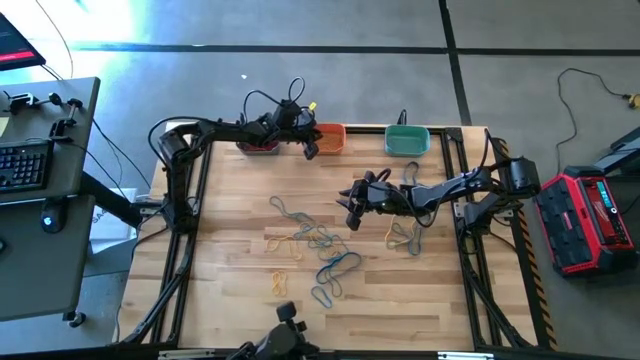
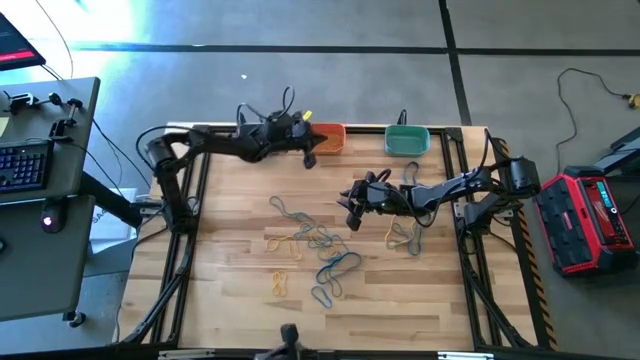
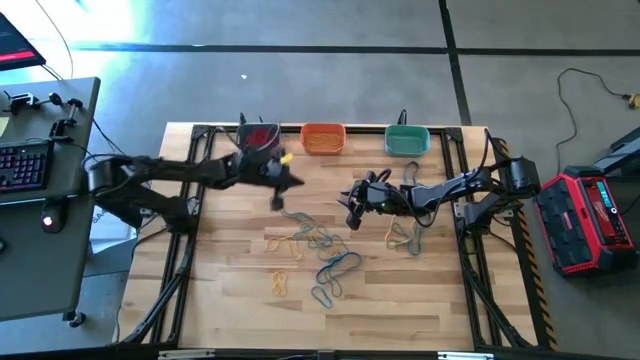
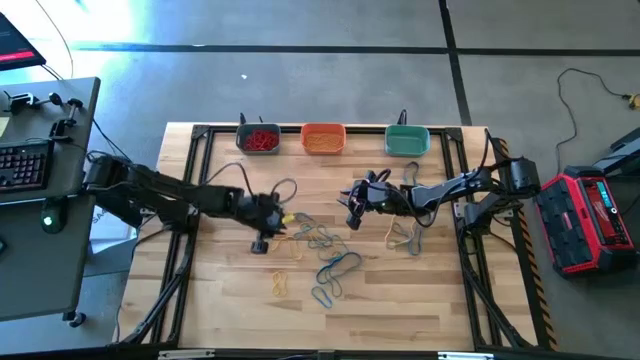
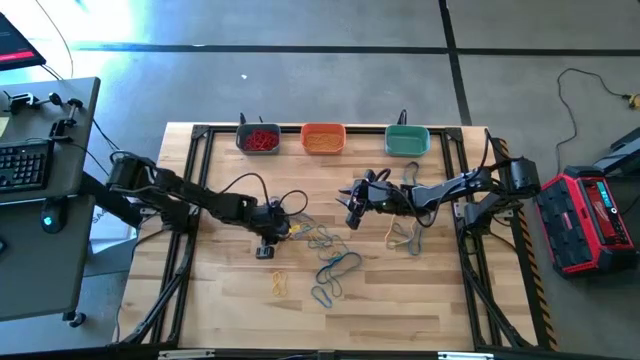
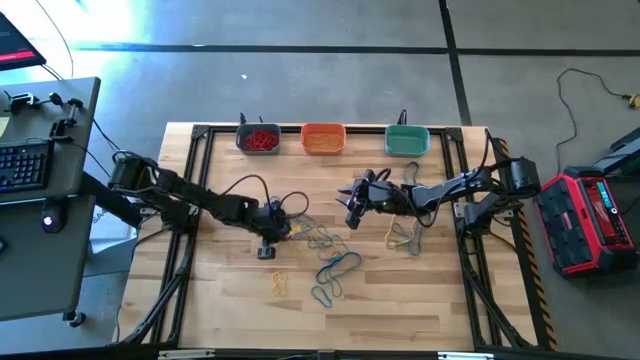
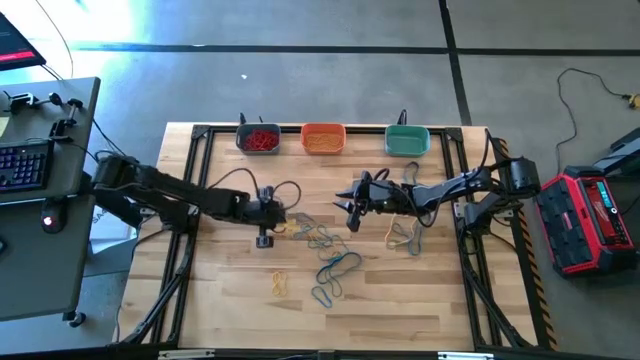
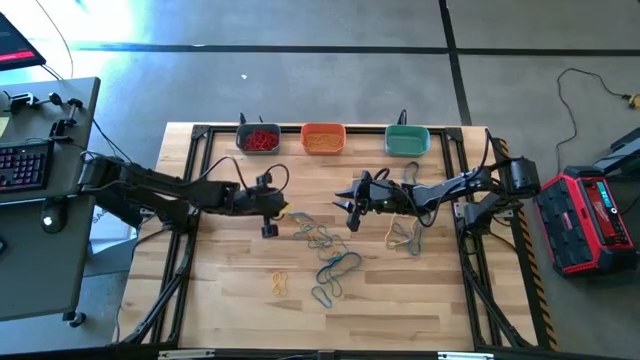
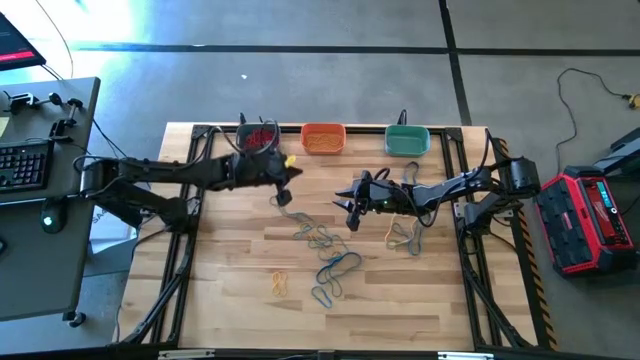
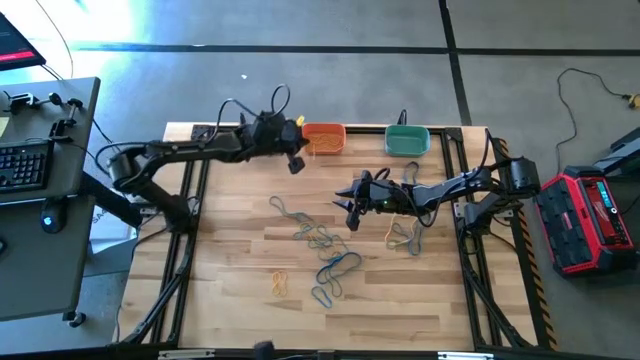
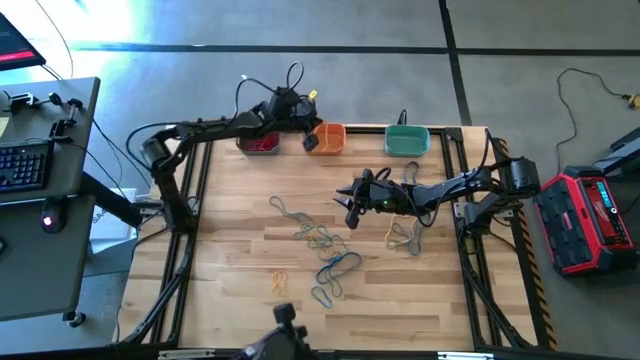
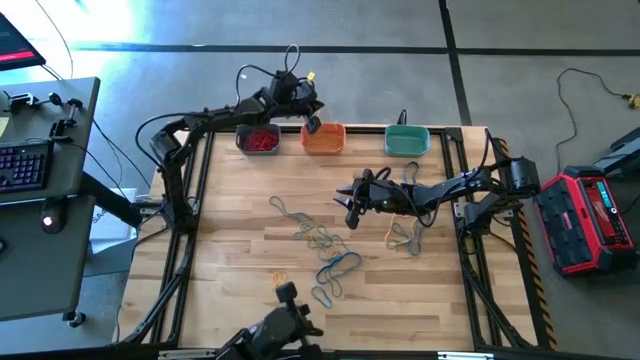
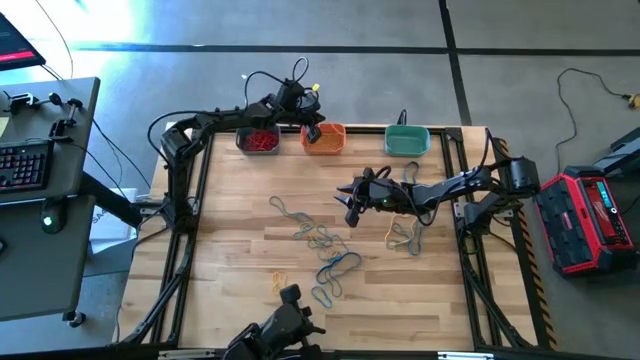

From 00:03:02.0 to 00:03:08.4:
Task: Sort rubber bands into baskets
Put the yellow rubber band into the orange bin

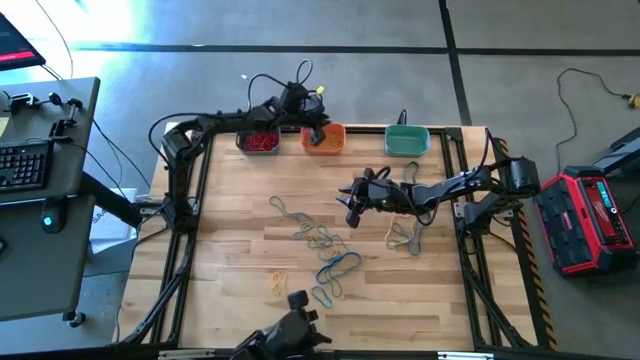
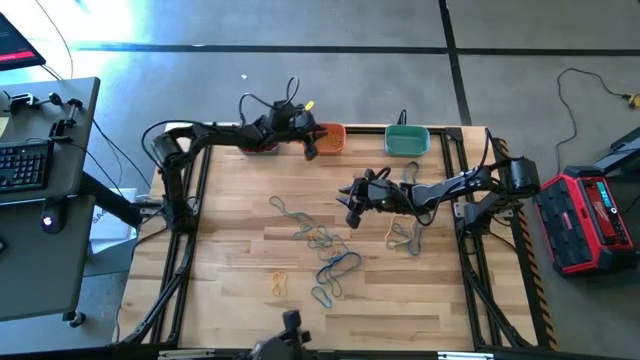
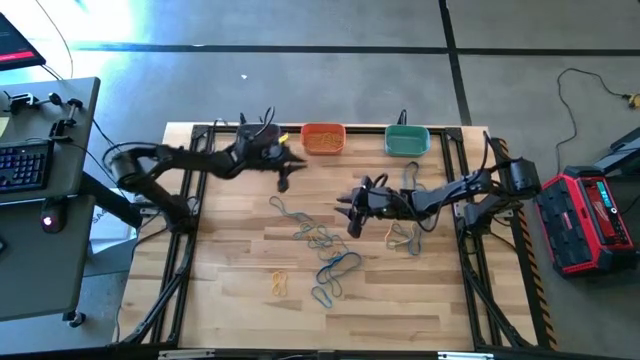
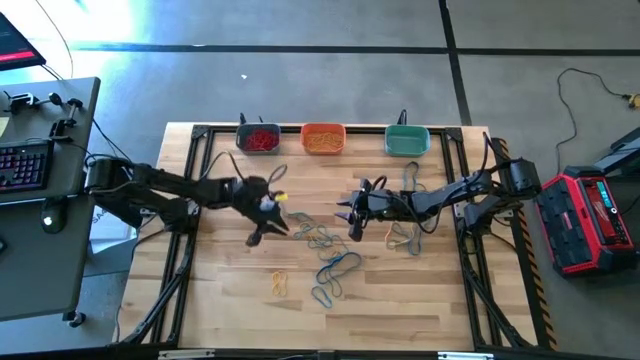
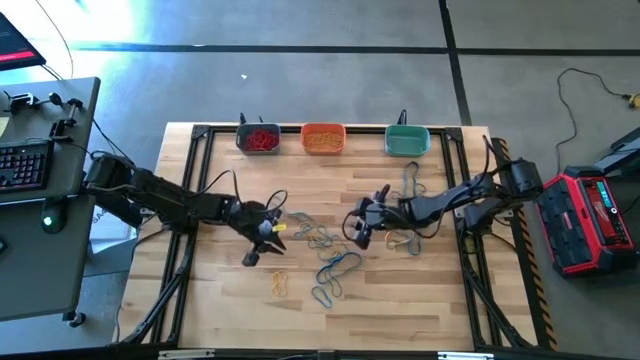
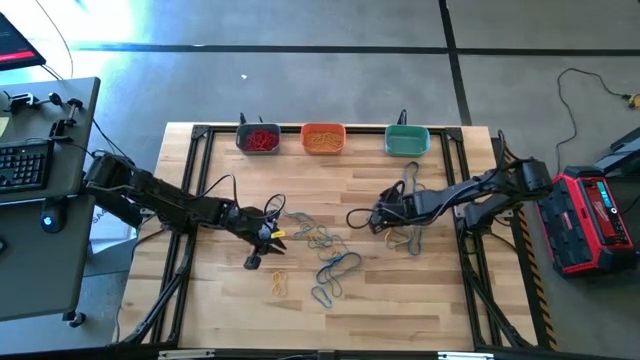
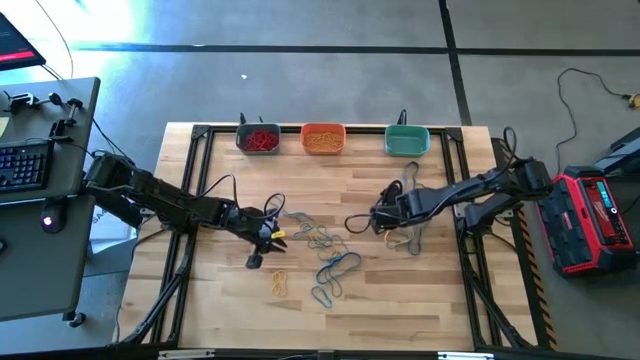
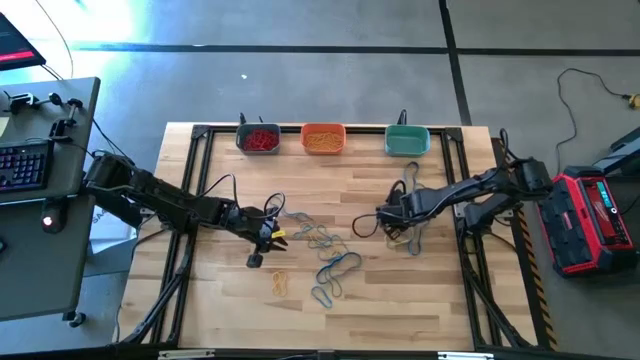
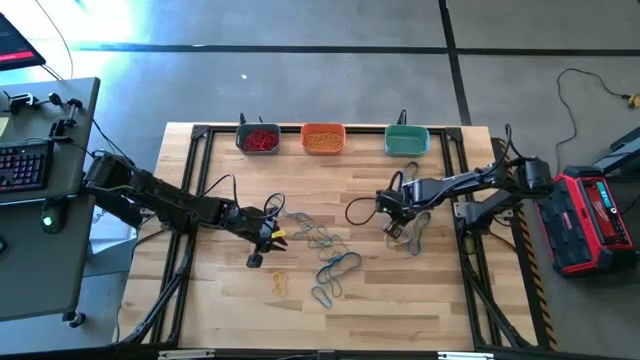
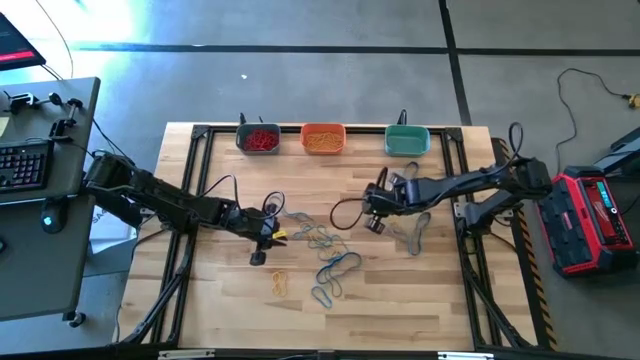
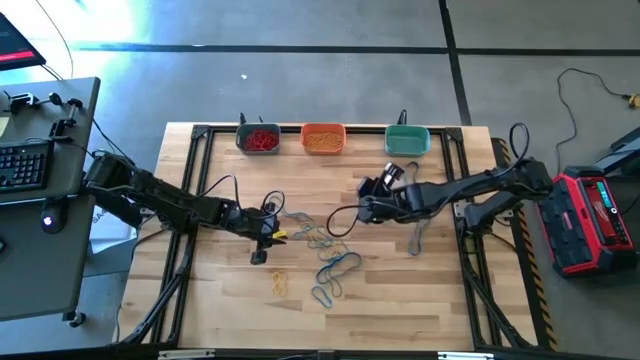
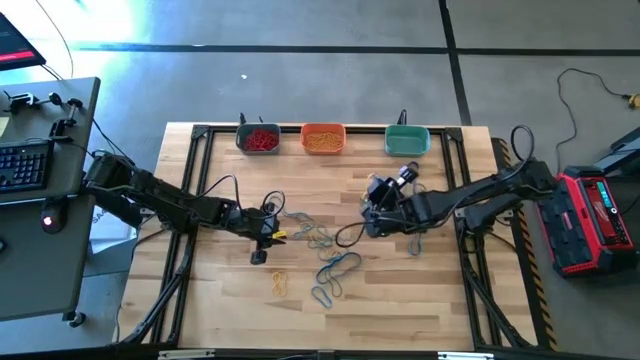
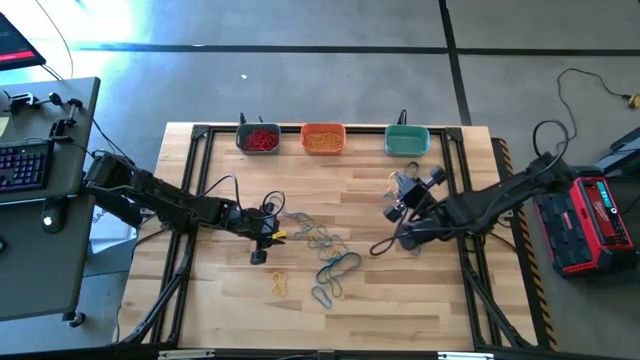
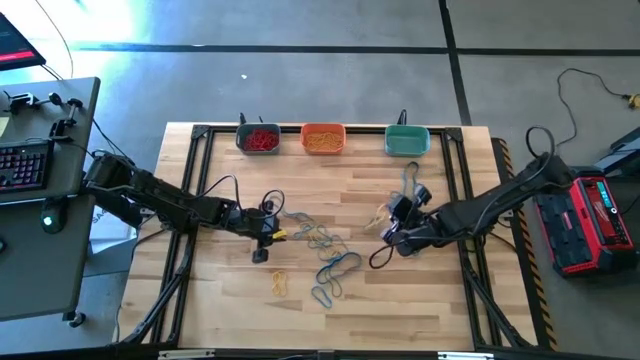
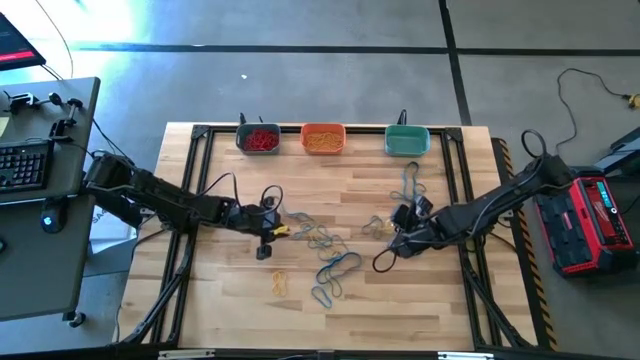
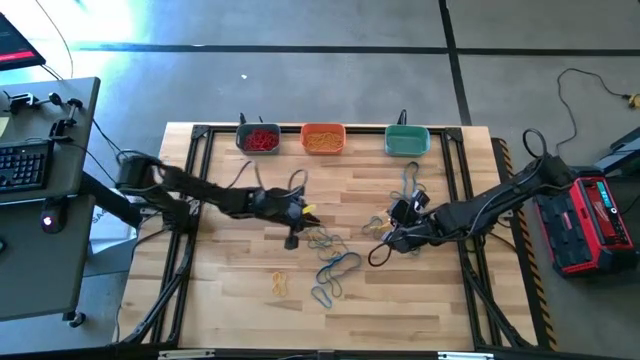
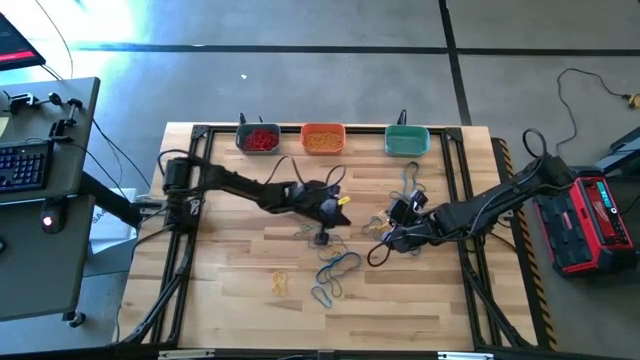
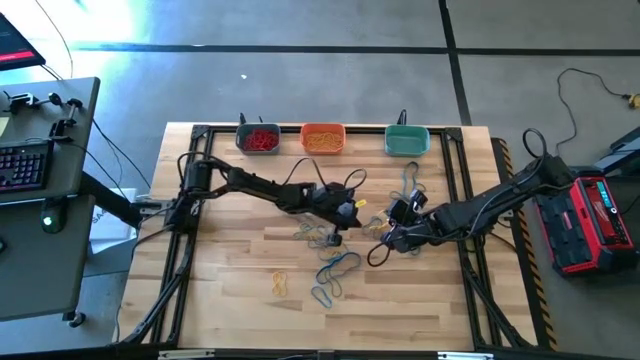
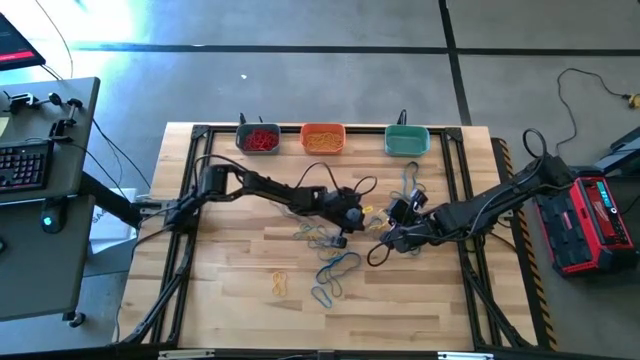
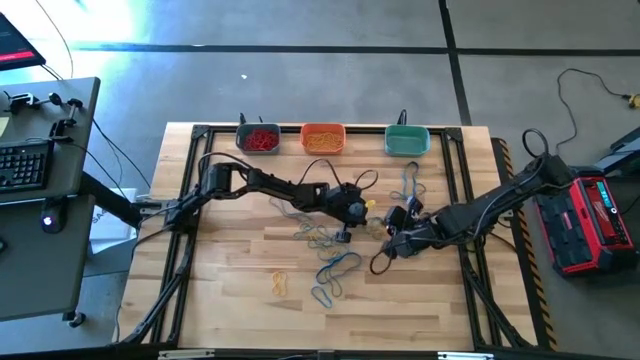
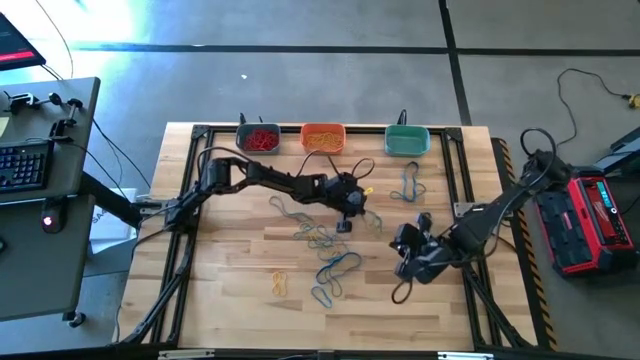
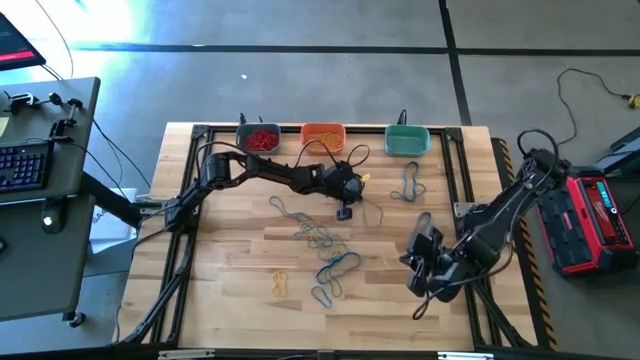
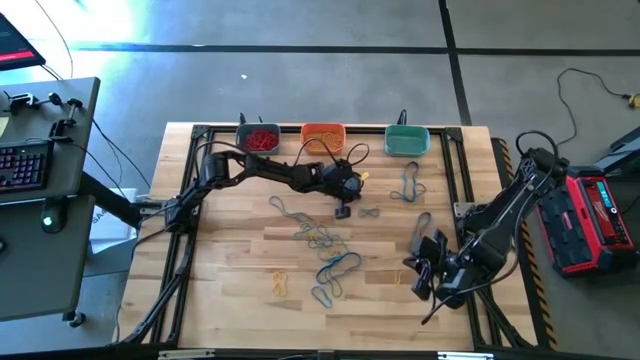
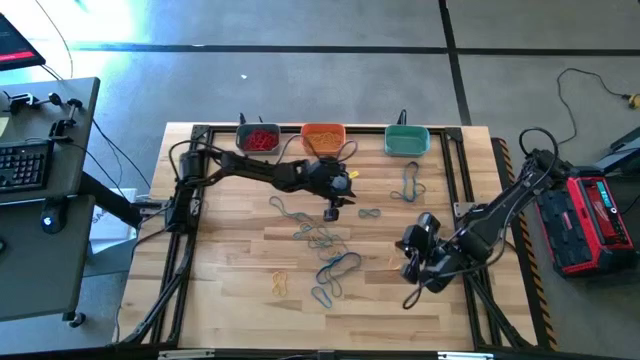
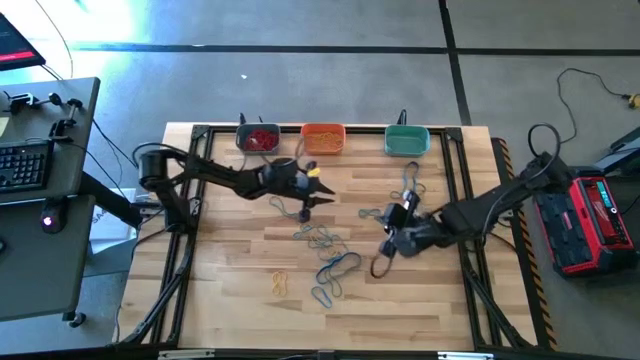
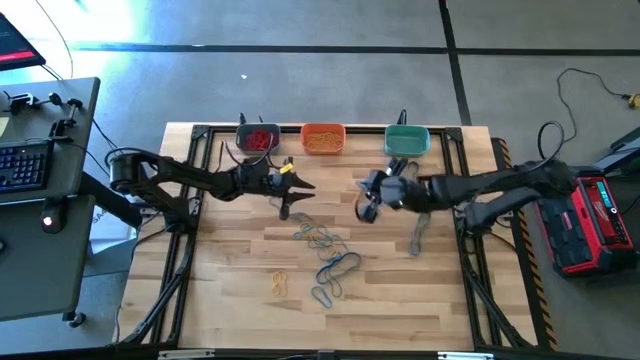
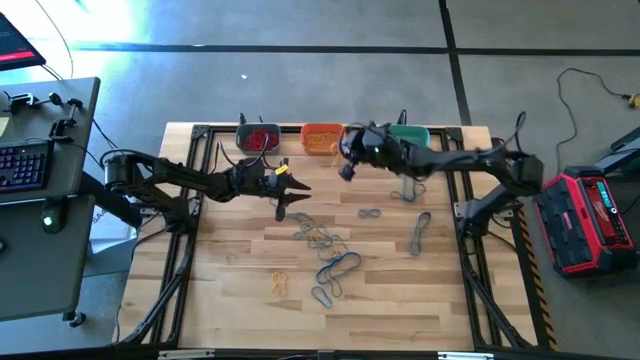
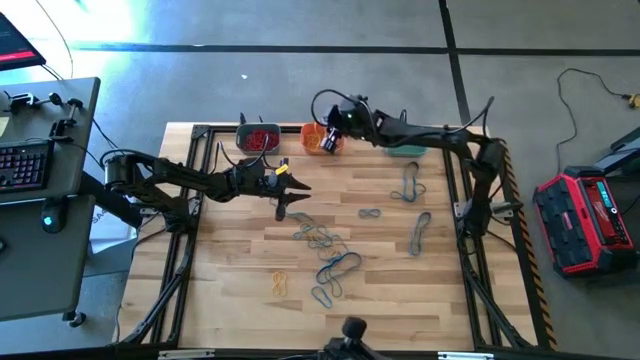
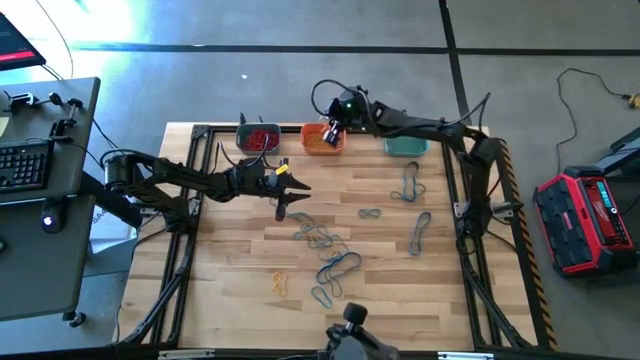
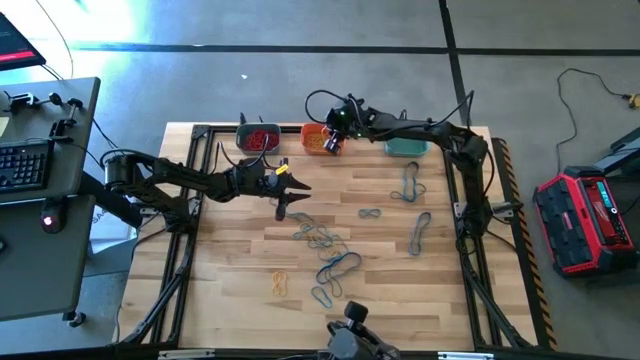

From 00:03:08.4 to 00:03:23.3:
Put the yellow rubber band into the orange bin

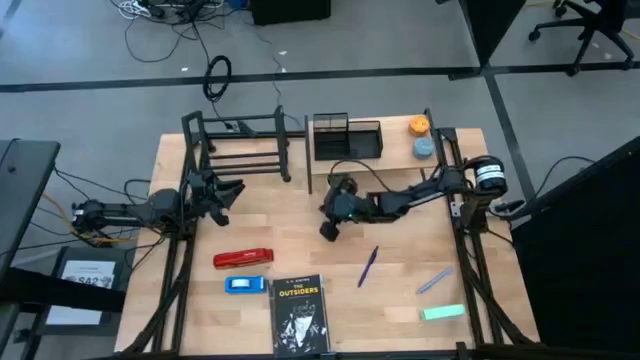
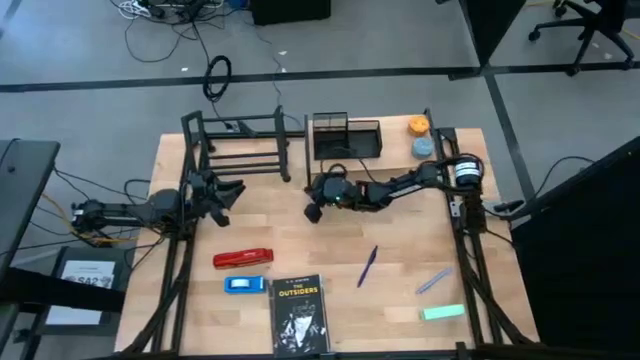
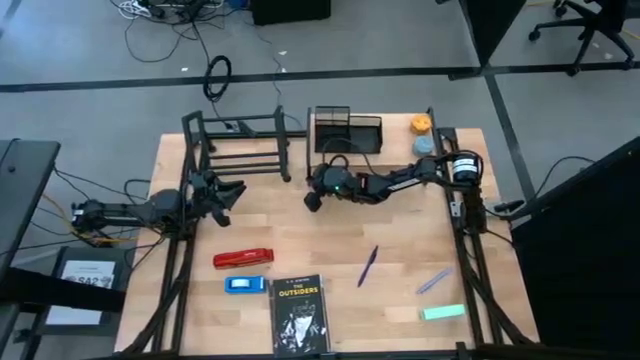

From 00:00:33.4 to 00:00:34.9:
Task: Stock shelves
Adjust the shelf
